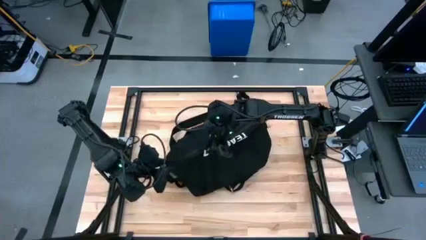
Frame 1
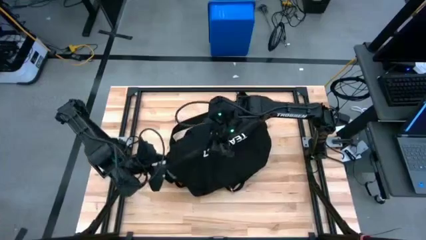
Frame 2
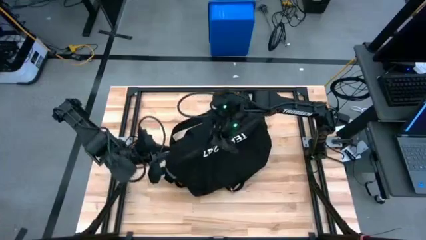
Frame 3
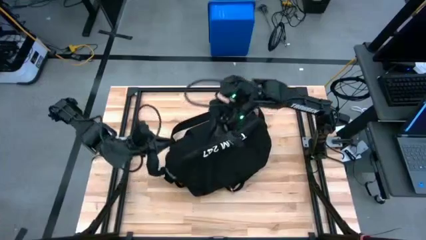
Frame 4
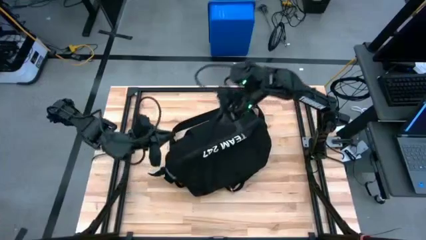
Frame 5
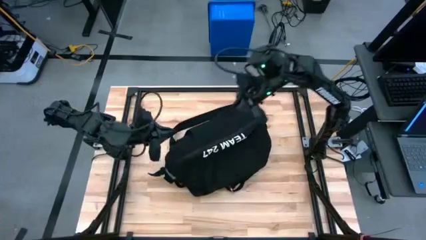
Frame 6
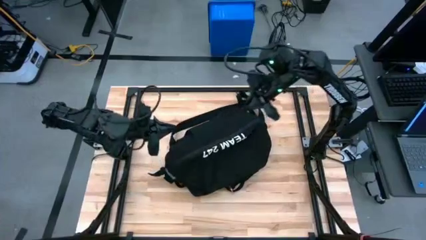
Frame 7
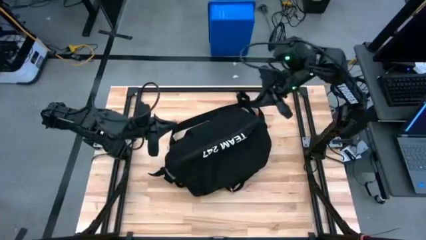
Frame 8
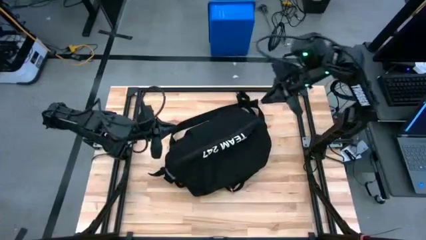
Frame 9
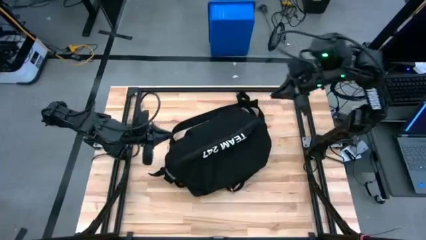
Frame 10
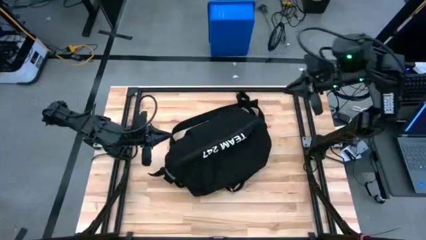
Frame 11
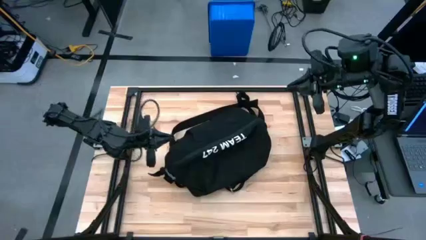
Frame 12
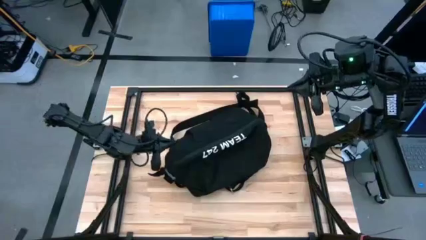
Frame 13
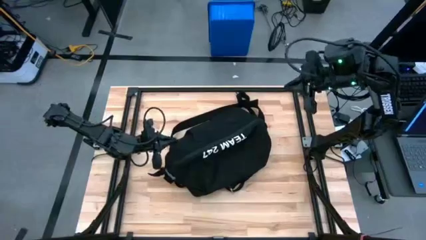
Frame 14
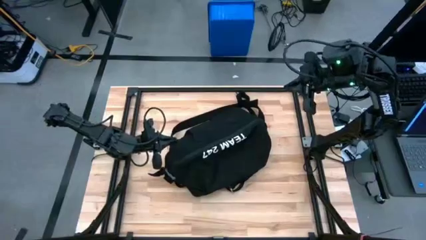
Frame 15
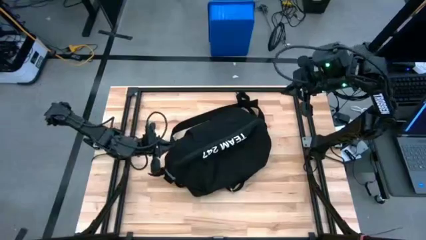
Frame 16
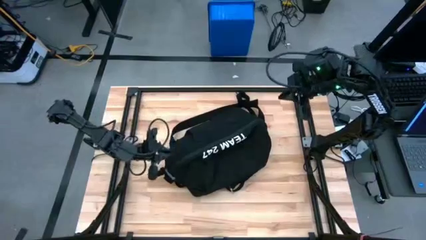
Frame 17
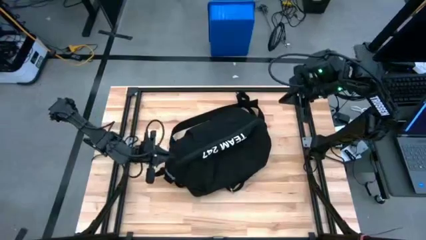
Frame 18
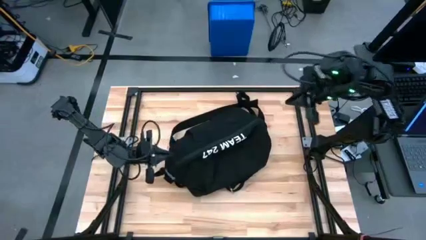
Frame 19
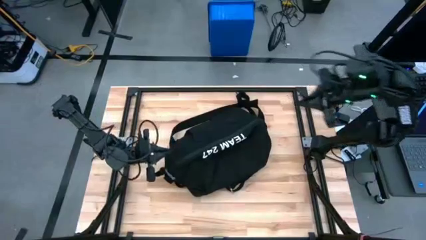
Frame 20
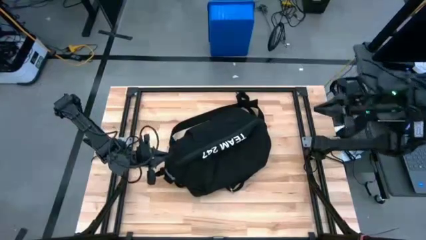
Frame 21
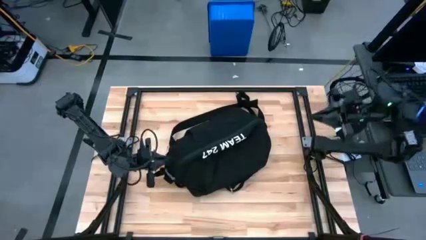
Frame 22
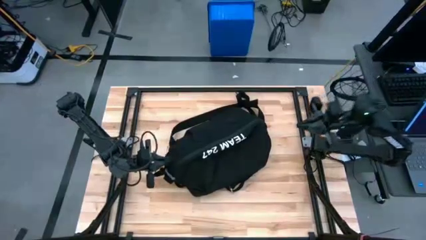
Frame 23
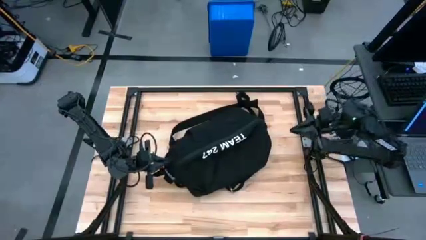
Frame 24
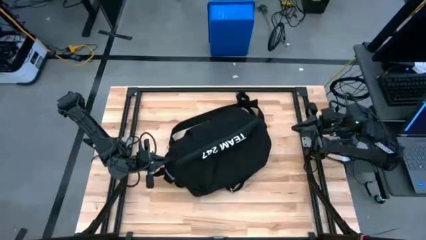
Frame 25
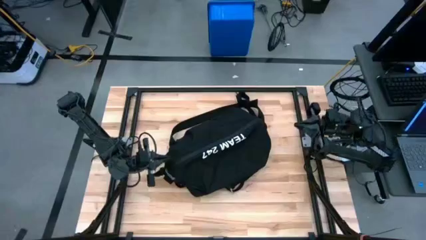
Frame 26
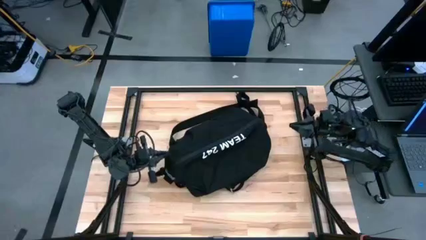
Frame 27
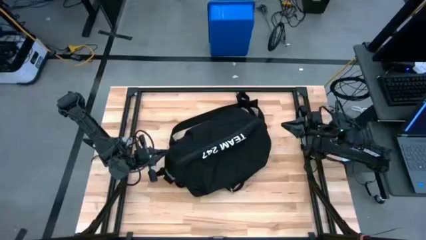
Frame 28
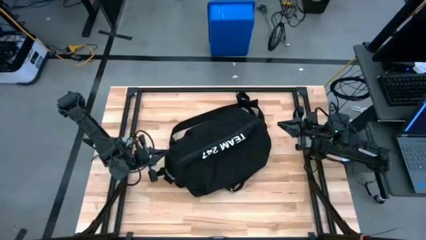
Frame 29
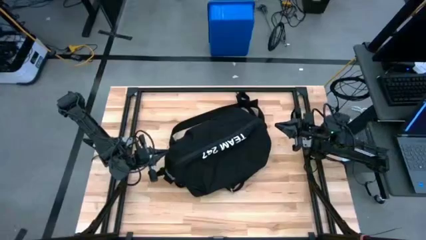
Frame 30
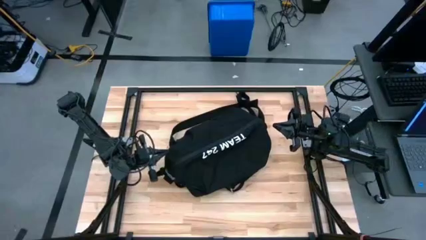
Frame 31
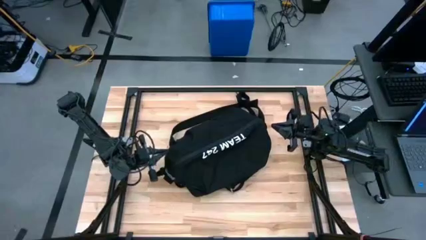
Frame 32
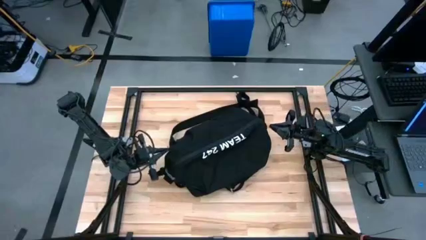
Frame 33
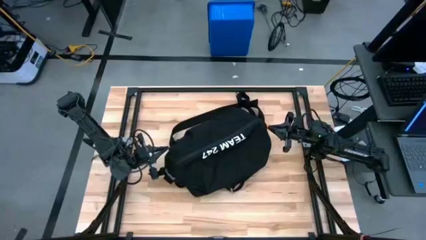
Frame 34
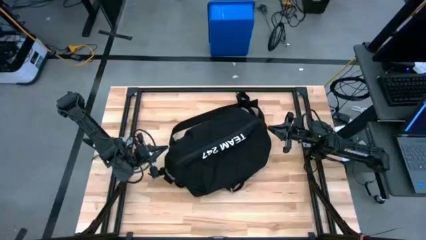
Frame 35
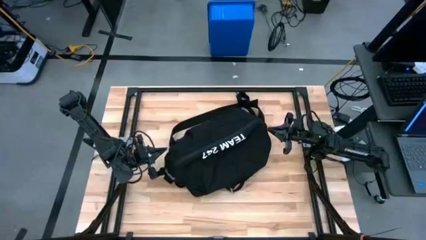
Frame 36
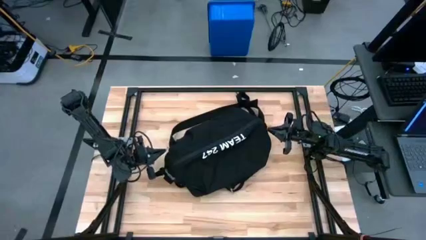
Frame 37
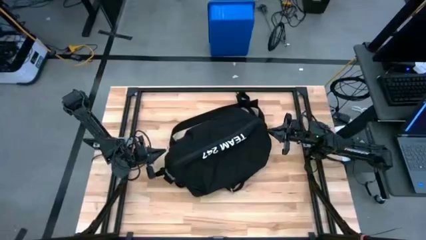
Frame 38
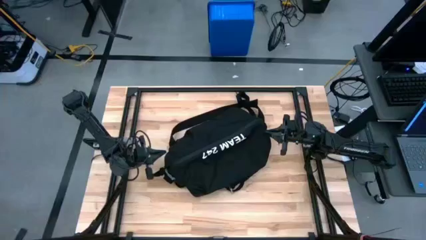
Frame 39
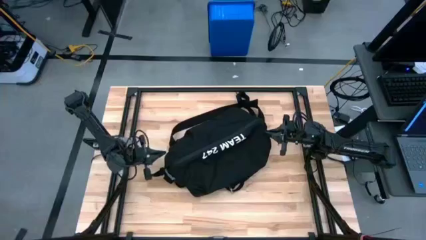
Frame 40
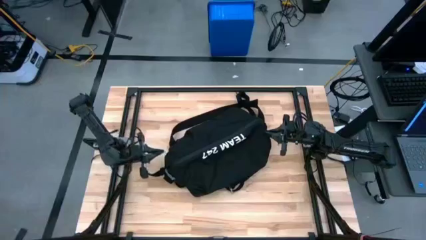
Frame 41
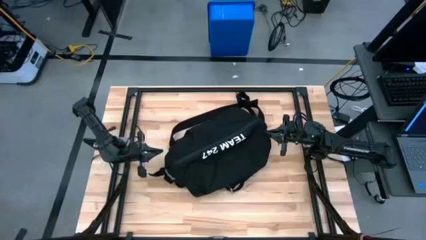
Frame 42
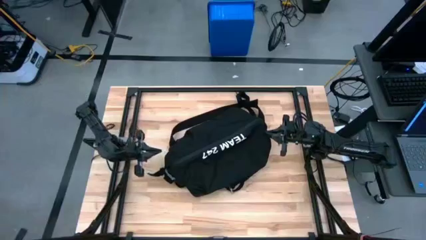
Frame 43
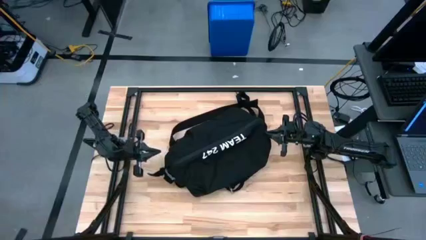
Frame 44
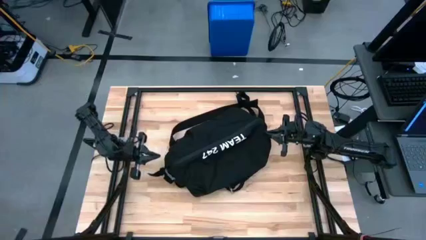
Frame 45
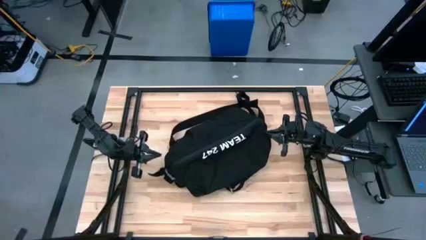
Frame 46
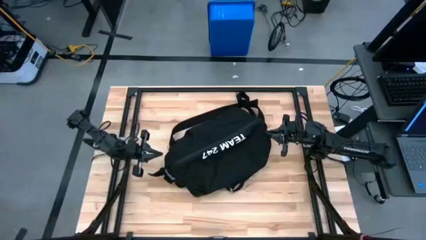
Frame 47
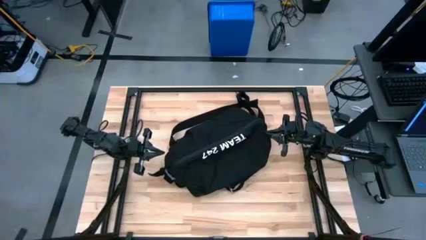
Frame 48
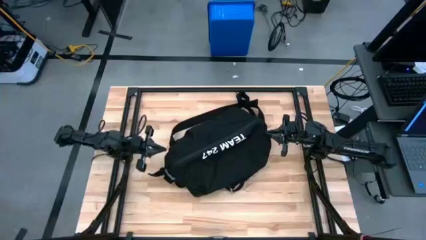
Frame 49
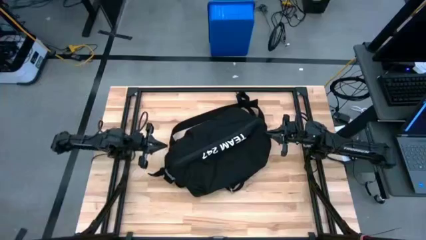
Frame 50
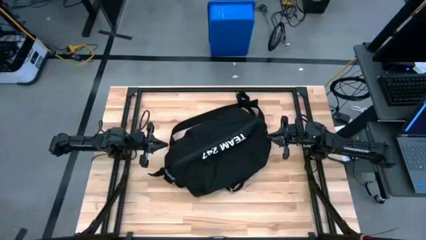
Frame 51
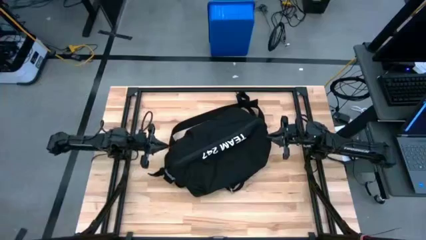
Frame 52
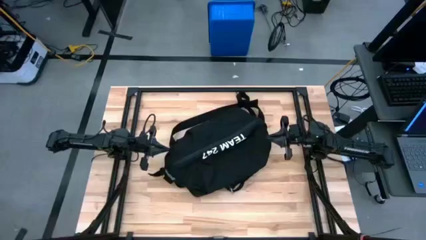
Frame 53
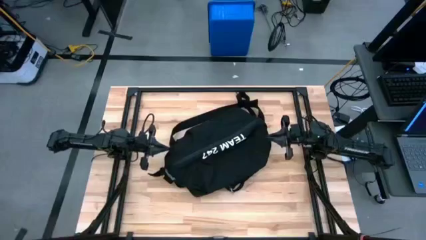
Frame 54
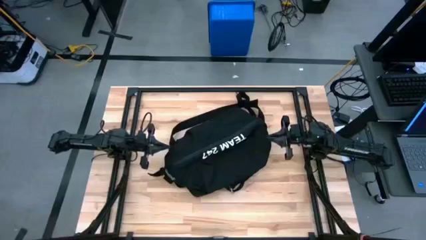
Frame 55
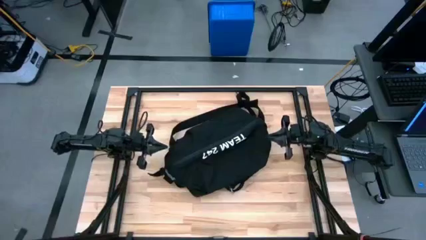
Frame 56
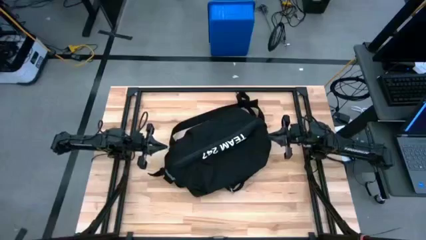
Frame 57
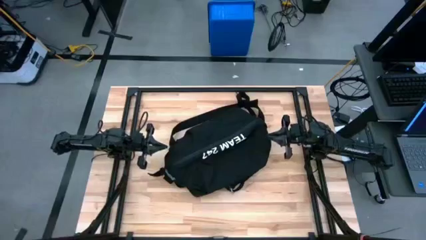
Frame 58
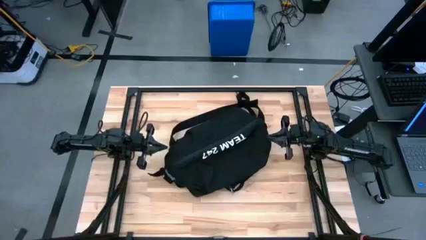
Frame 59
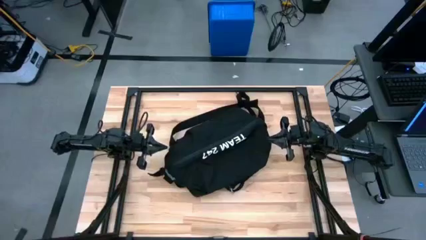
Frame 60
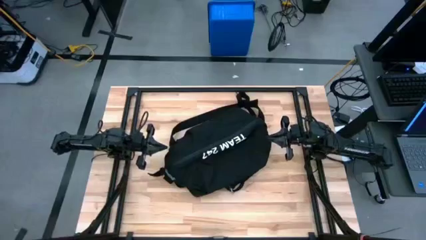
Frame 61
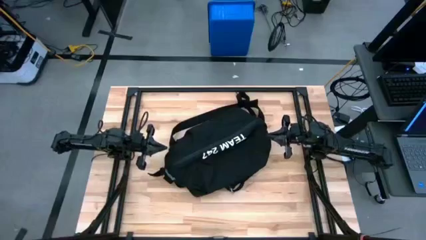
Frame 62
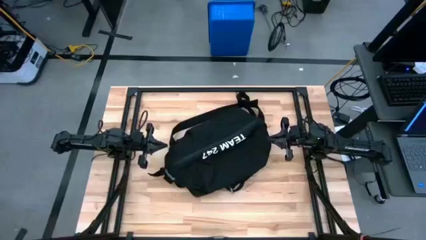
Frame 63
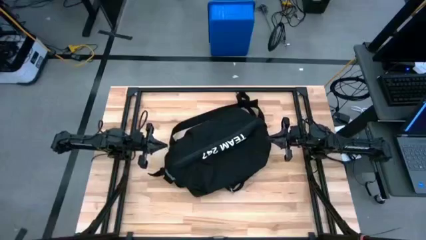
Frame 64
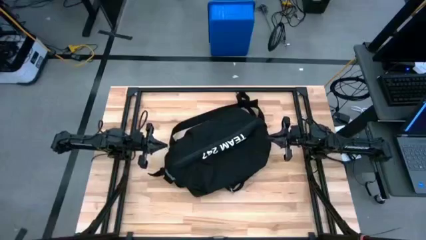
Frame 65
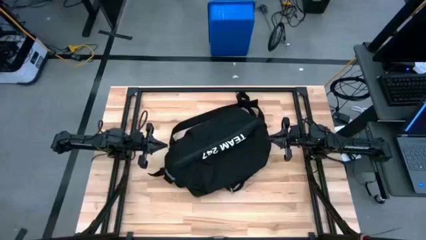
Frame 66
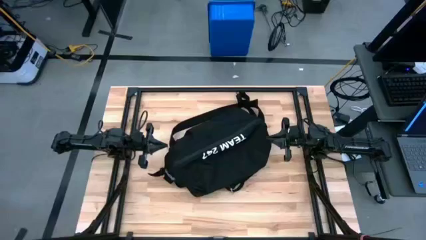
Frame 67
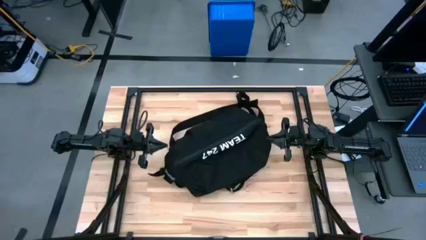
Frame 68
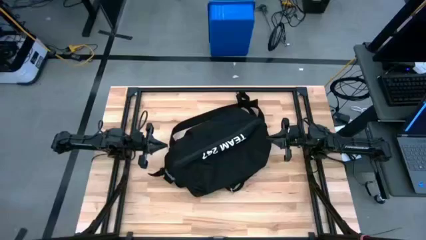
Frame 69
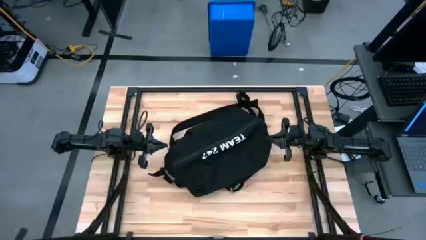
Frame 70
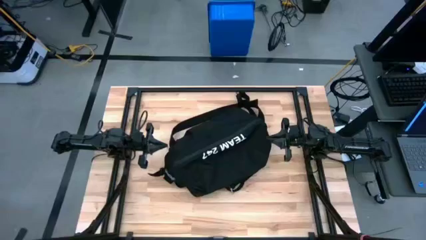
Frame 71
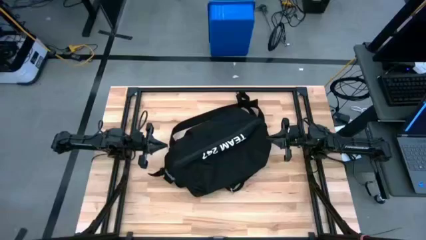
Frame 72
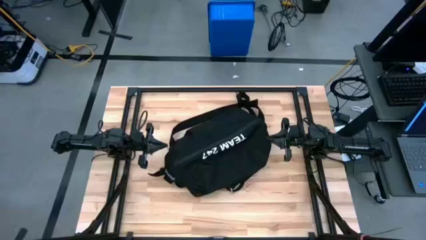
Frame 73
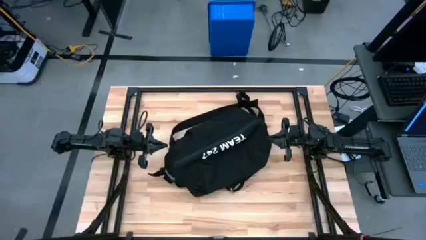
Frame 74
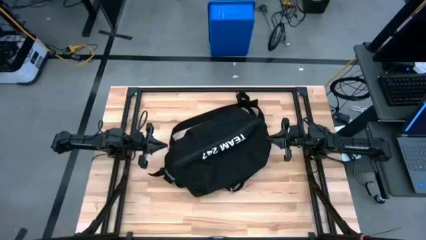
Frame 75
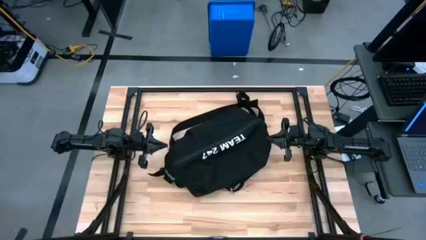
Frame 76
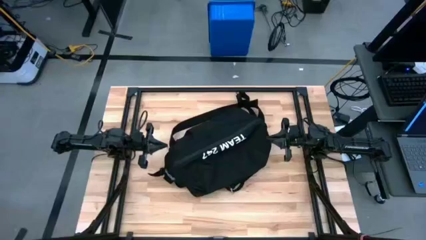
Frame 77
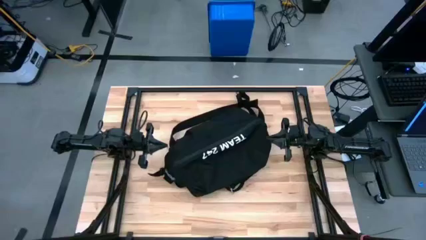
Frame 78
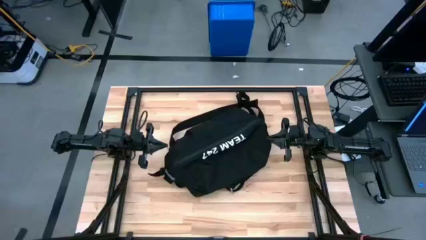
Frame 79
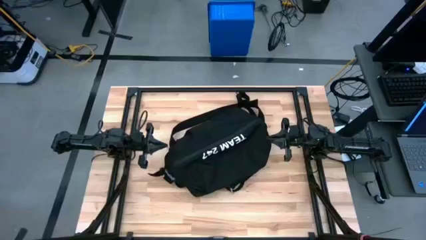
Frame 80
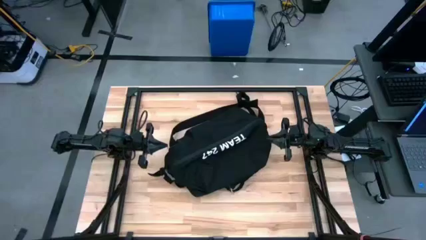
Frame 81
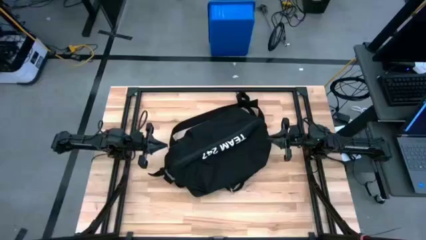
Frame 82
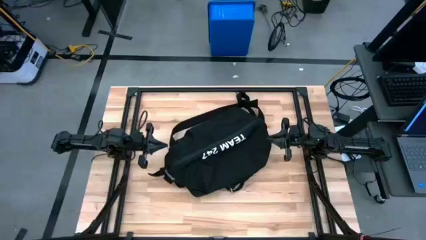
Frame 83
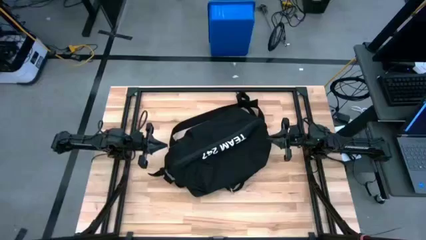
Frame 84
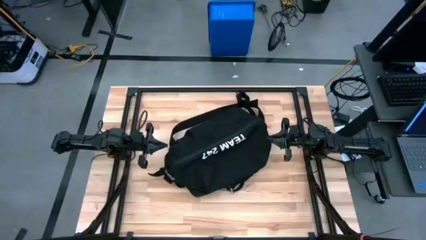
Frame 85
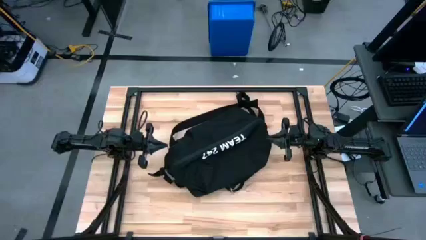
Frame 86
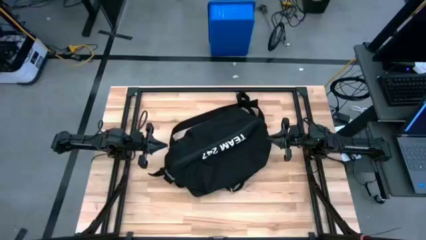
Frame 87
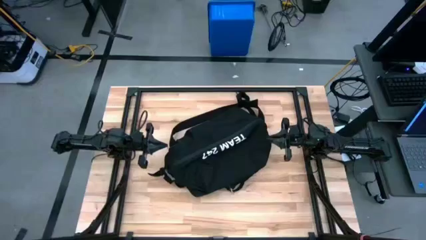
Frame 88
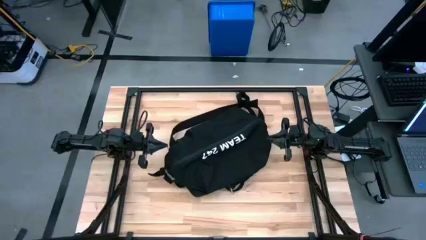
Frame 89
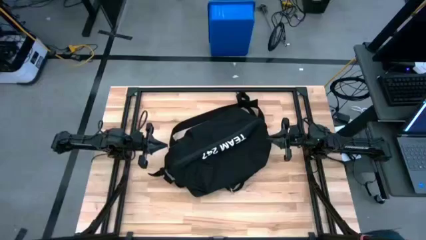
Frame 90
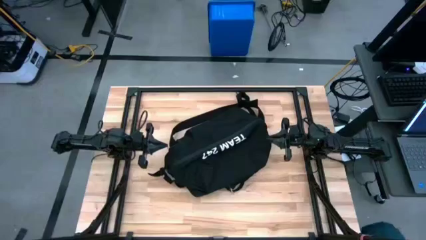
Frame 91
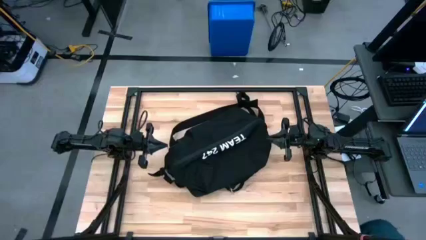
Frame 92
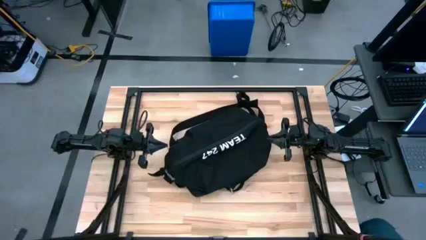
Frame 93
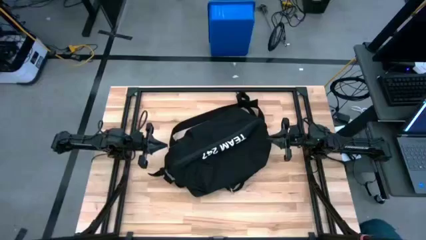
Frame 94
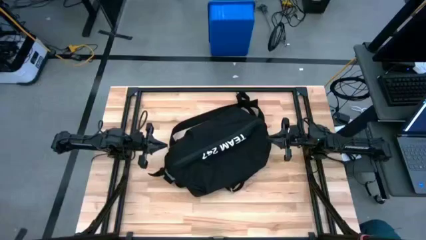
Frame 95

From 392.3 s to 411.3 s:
Task: Unpack backpack
Return to Home Position
